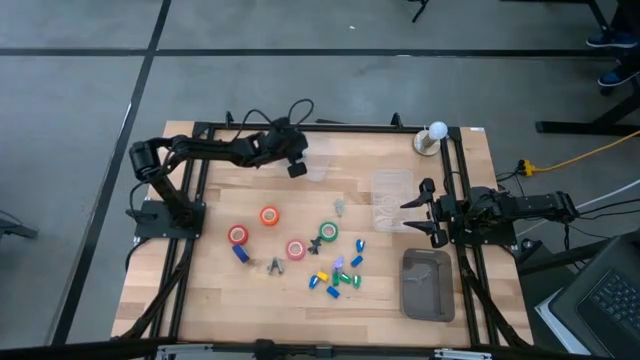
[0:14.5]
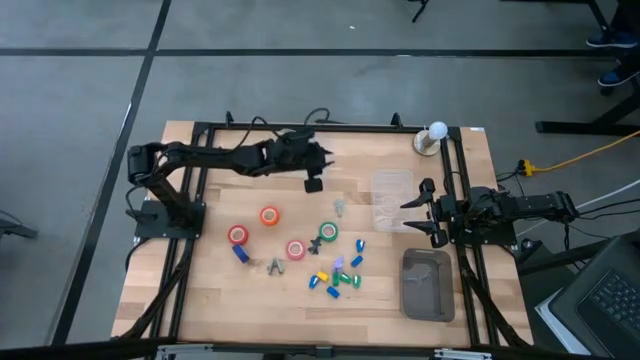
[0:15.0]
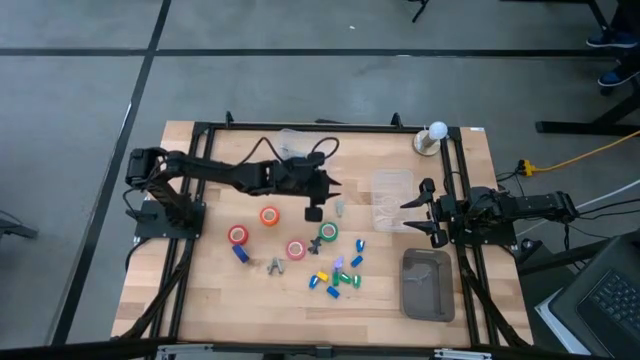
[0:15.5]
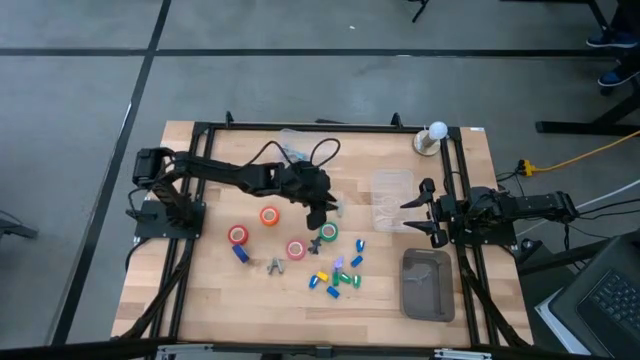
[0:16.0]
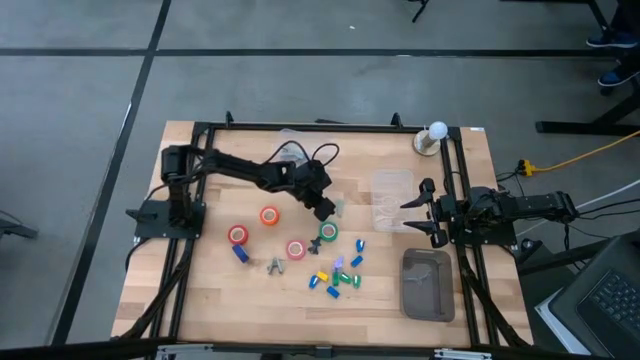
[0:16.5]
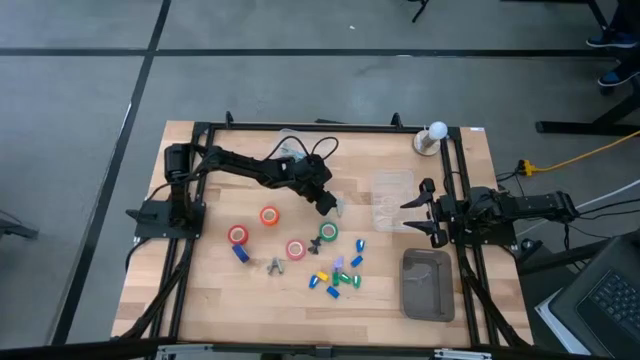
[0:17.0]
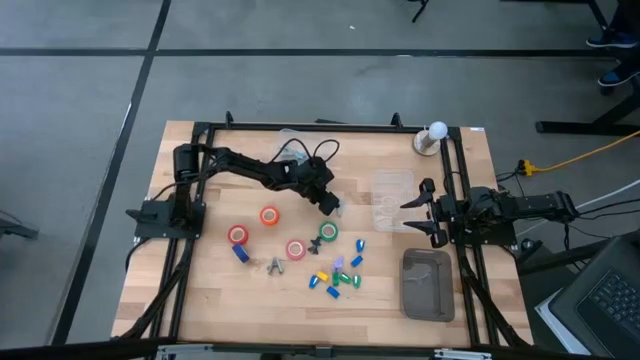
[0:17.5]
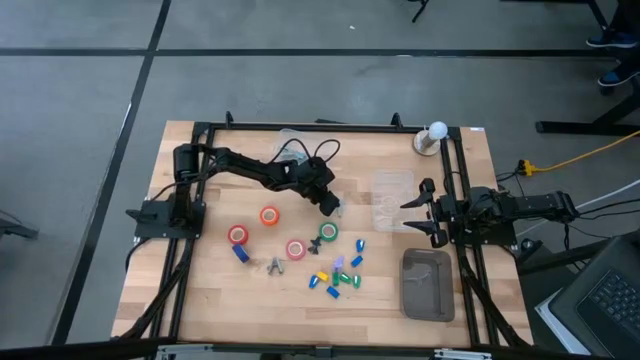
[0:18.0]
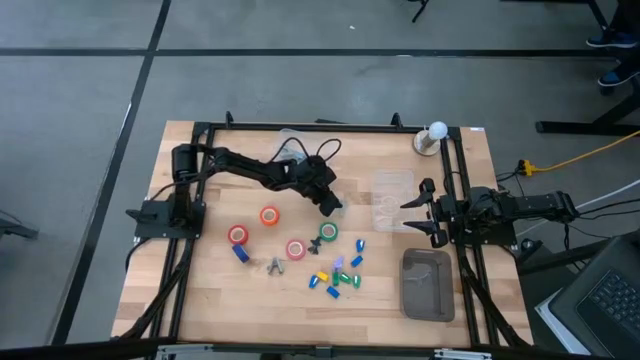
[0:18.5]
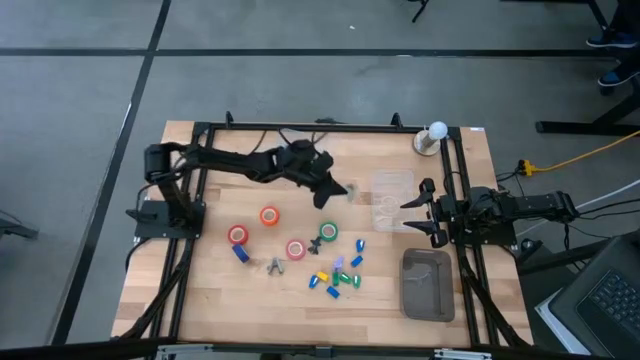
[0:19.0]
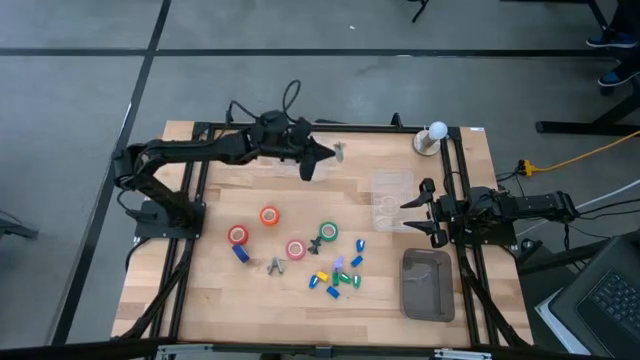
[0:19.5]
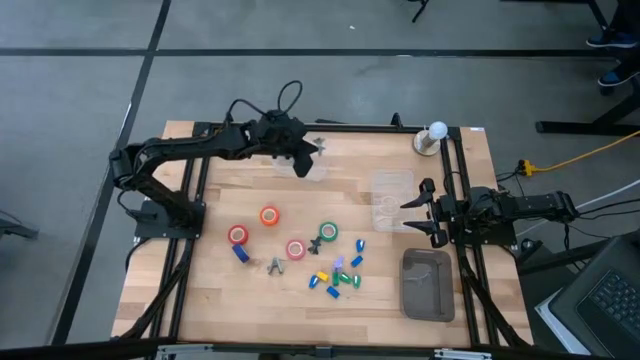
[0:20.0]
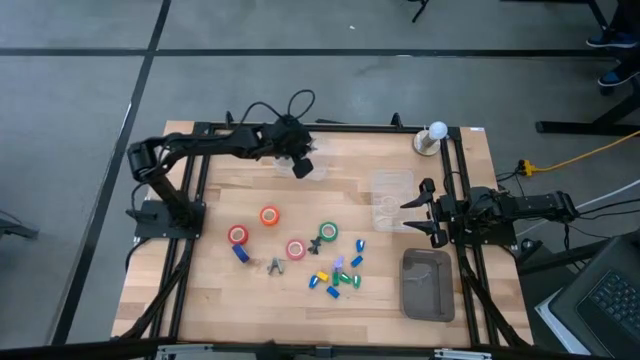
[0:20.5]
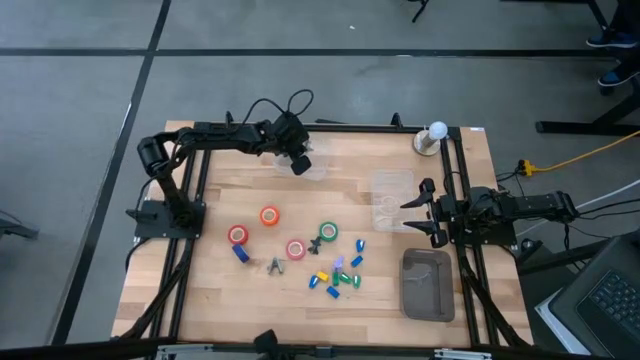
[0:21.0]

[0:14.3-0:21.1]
Task: Pick and place Stapler, Stapler remover, tape
Put the grey staple remover into the top transparent bin

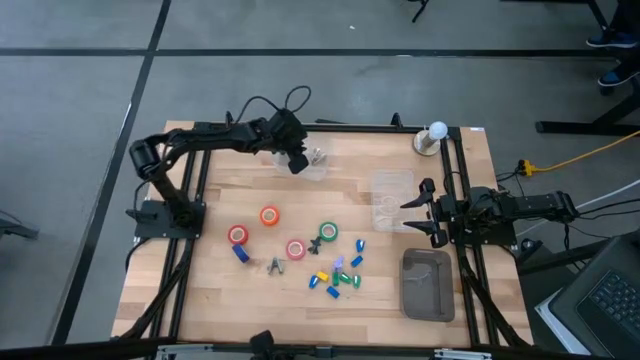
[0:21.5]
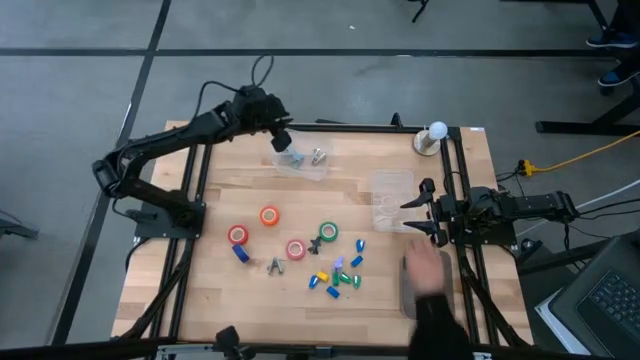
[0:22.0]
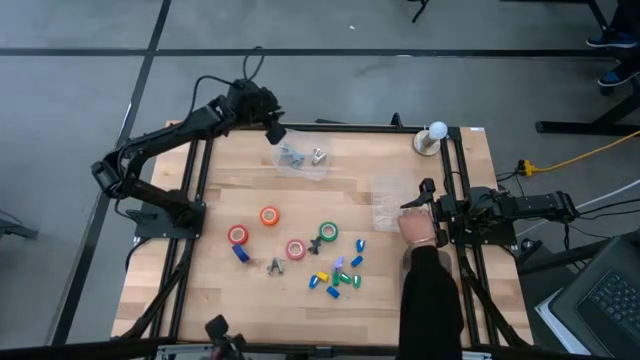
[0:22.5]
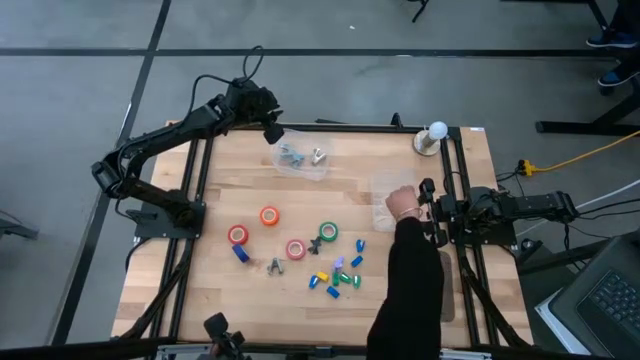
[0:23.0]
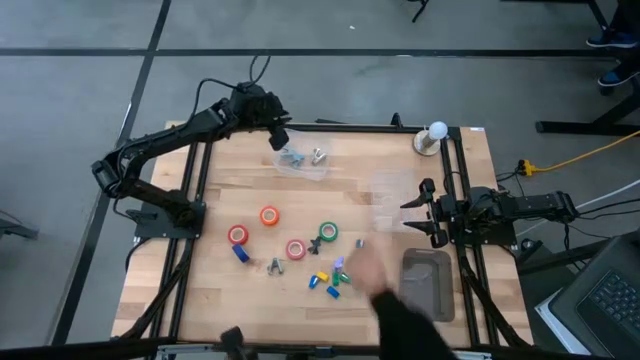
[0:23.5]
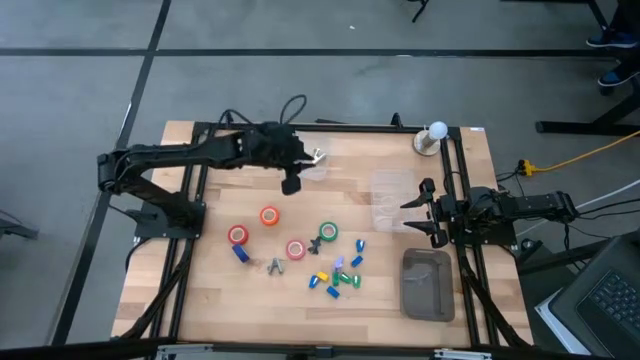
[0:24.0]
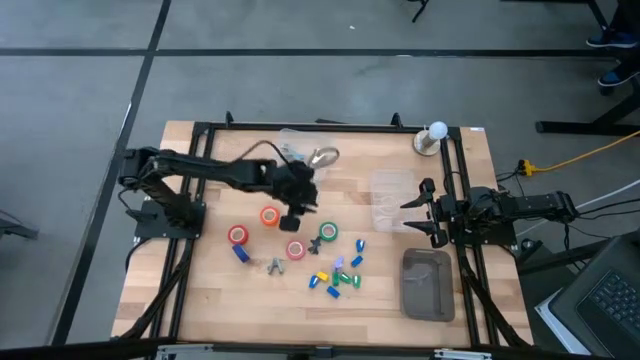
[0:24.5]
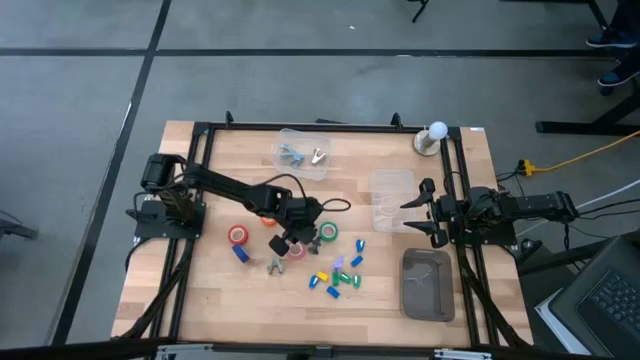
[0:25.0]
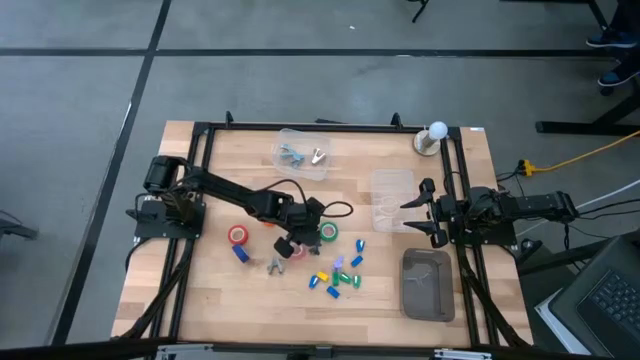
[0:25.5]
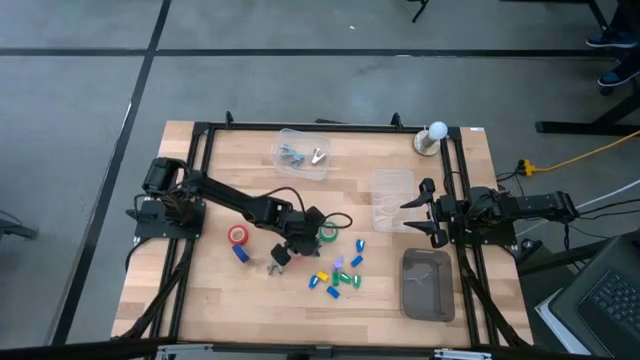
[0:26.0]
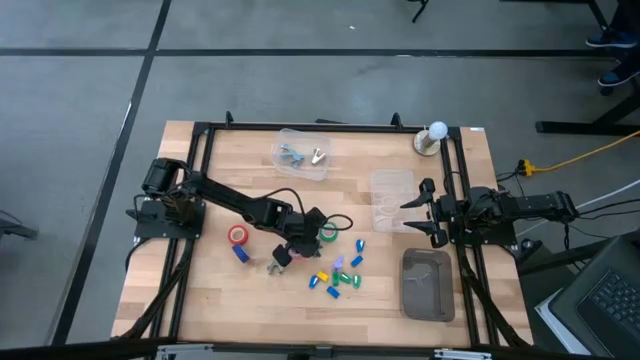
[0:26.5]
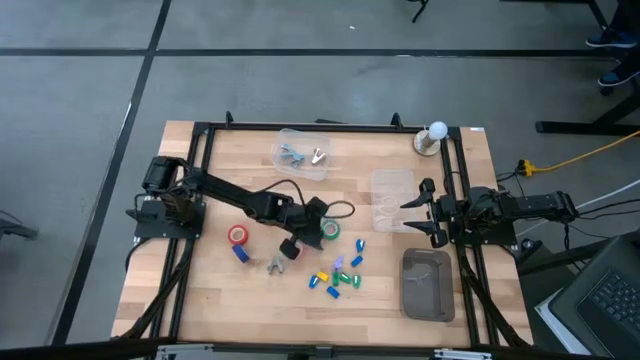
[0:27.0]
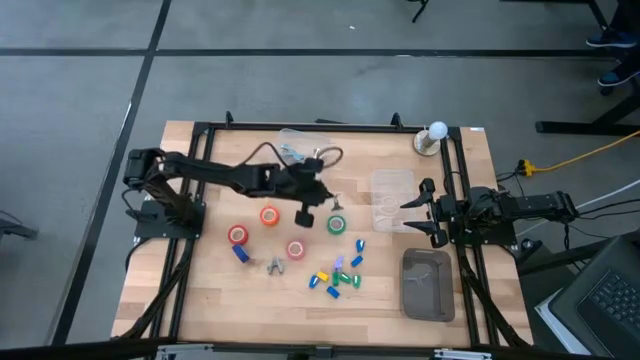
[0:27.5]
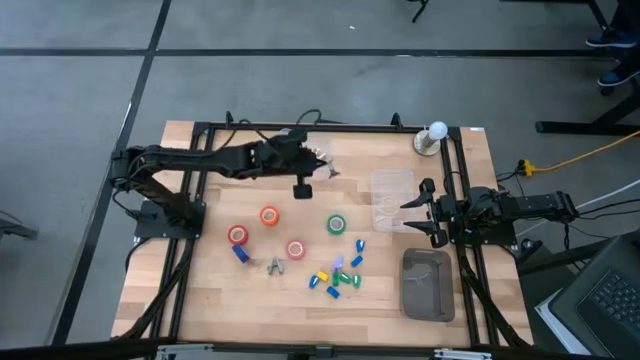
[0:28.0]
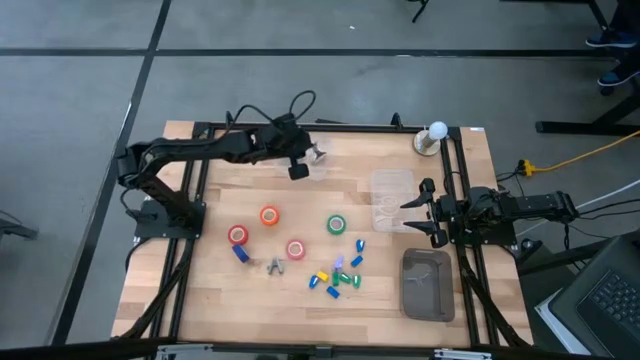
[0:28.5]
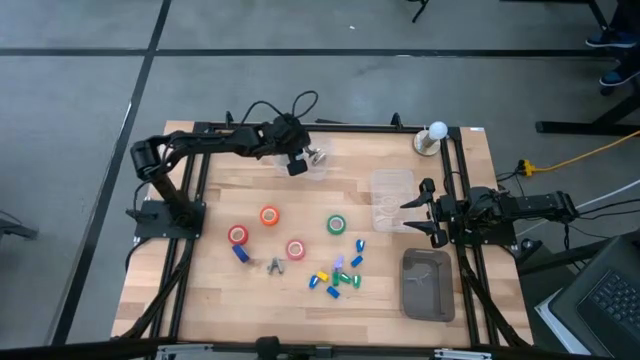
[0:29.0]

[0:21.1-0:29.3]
Put the blue staple remover into the top transparent bin

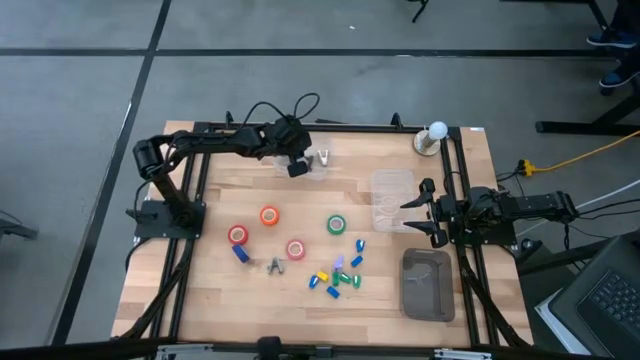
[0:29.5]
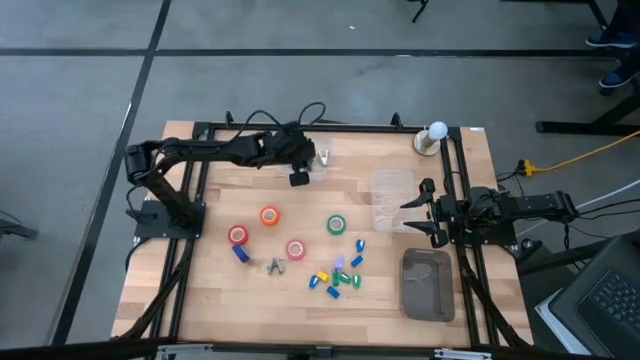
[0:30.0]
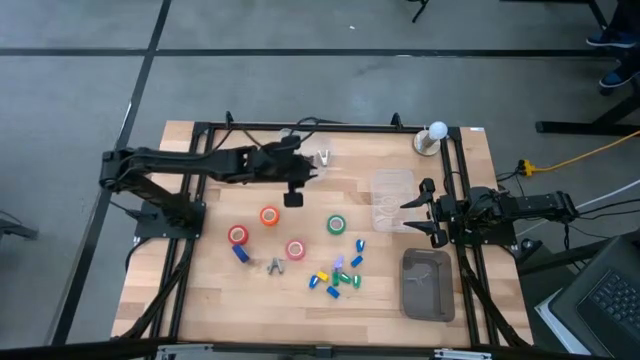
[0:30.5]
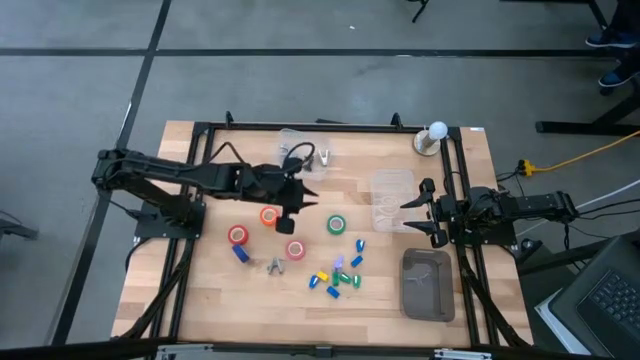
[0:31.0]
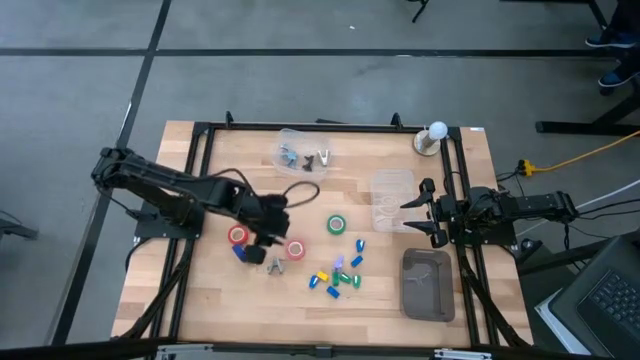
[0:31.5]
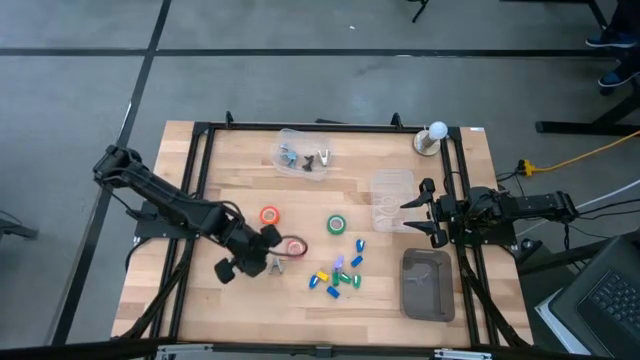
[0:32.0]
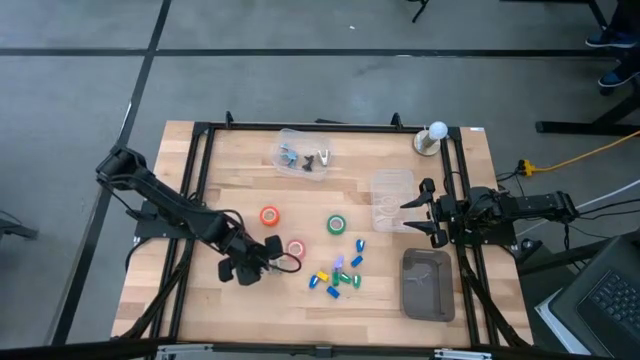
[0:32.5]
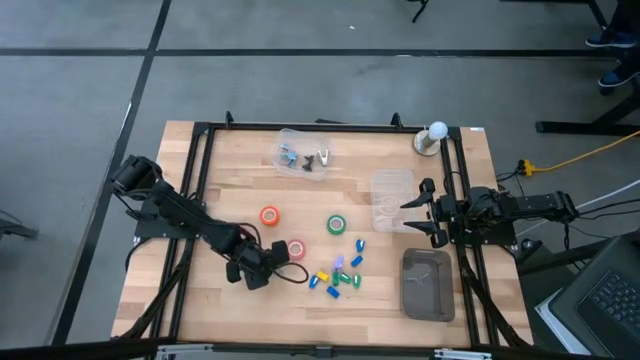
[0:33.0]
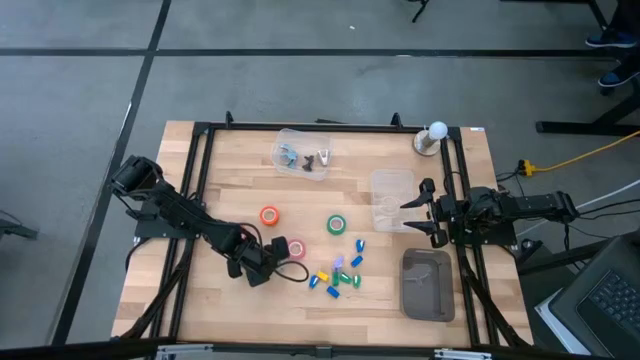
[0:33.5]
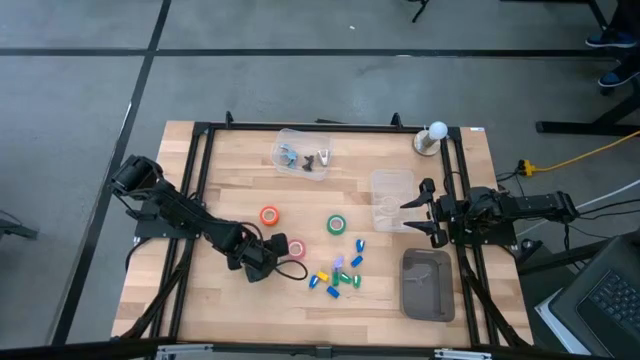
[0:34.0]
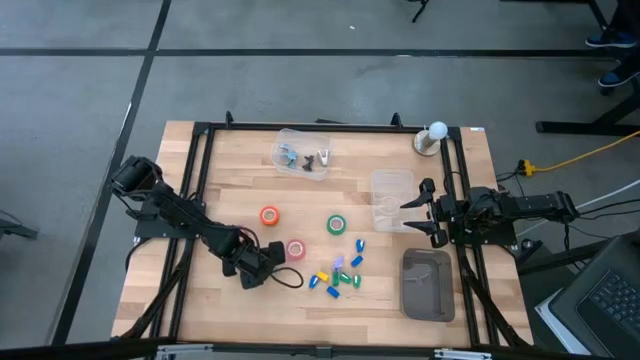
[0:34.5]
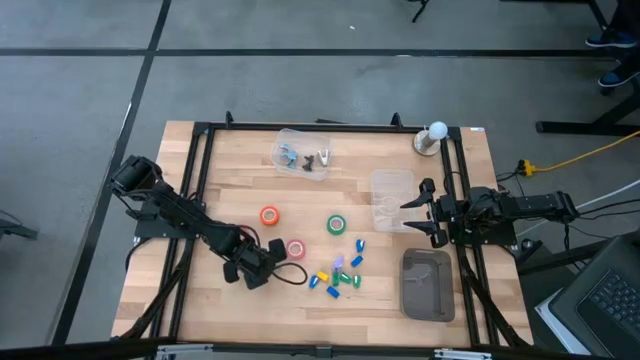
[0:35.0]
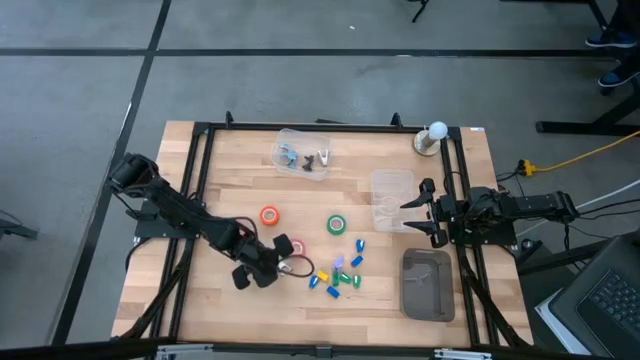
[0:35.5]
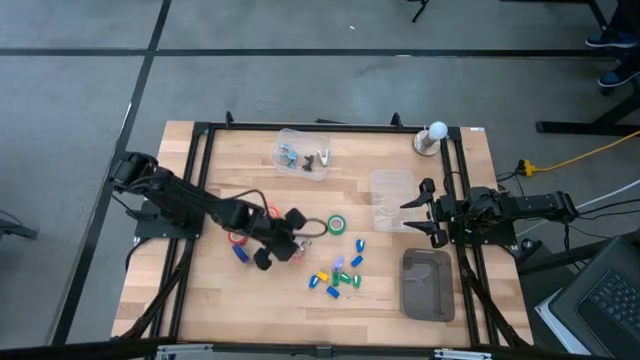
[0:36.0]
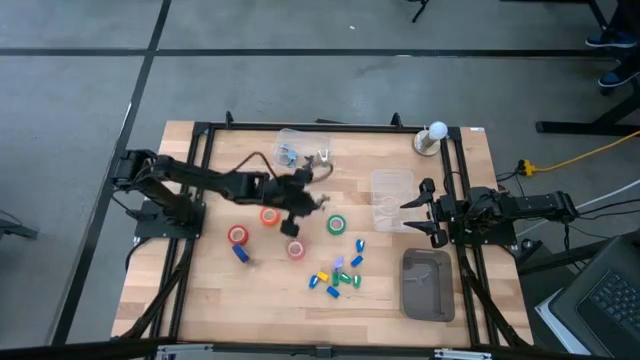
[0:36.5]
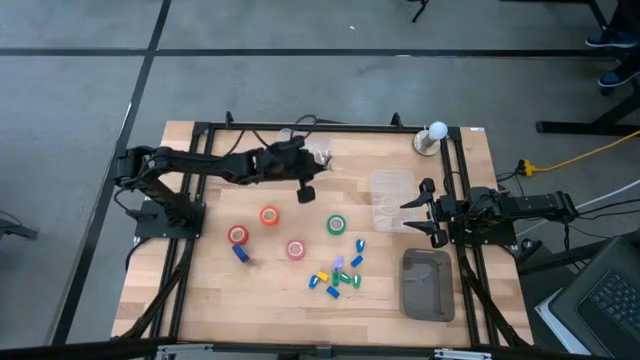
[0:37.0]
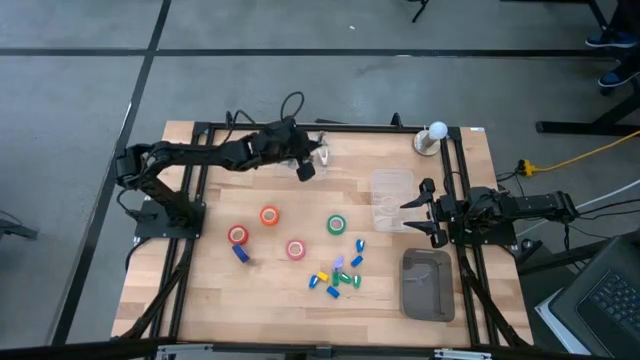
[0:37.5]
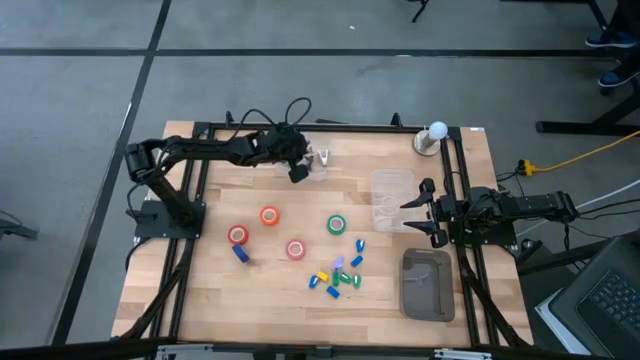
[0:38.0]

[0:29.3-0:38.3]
Put the grey stapler remover into the top transparent bin
